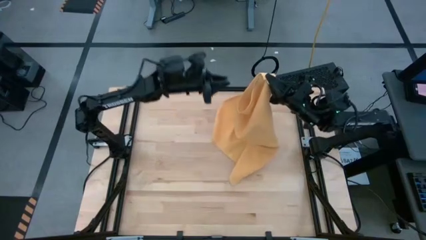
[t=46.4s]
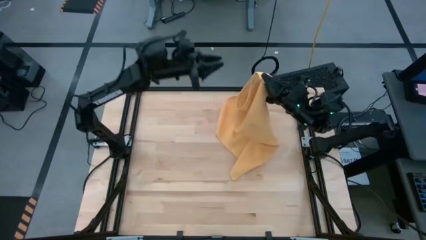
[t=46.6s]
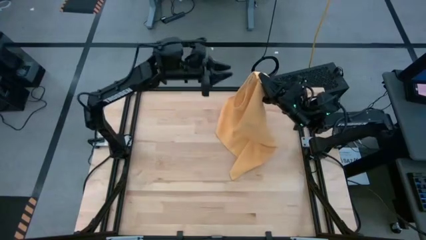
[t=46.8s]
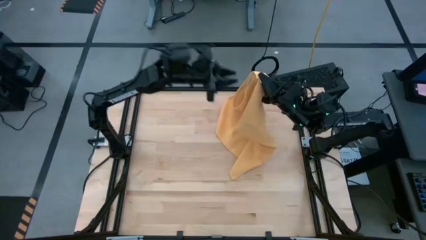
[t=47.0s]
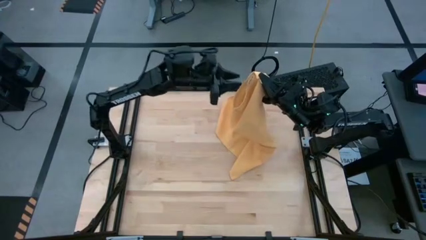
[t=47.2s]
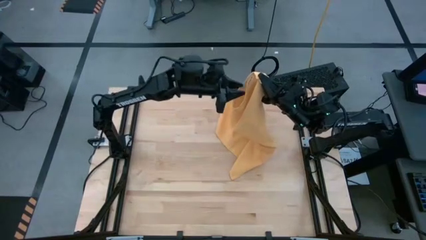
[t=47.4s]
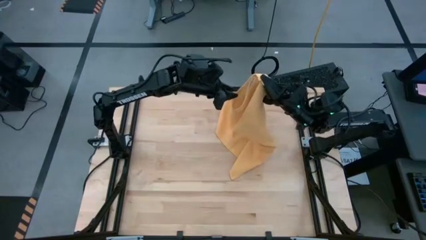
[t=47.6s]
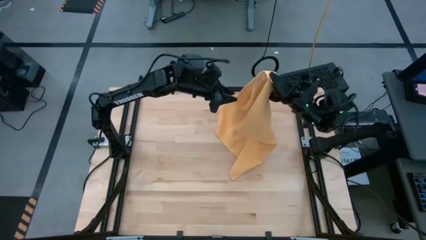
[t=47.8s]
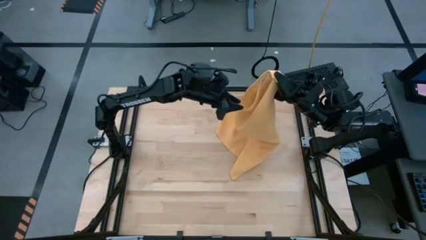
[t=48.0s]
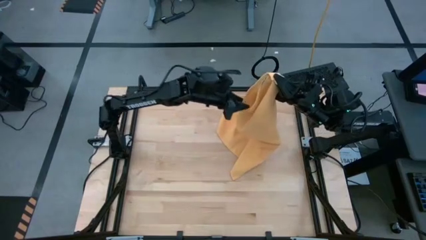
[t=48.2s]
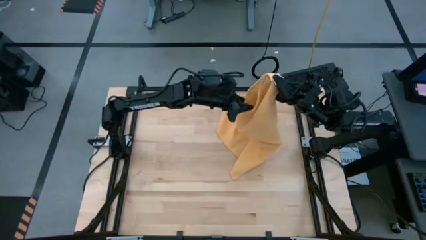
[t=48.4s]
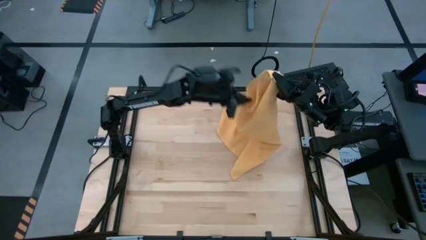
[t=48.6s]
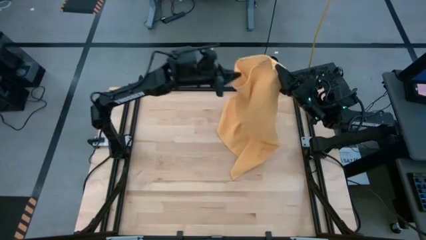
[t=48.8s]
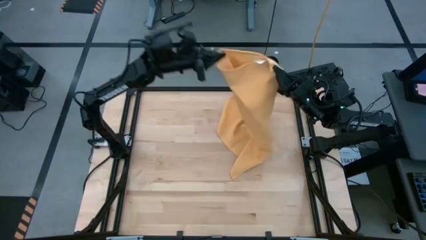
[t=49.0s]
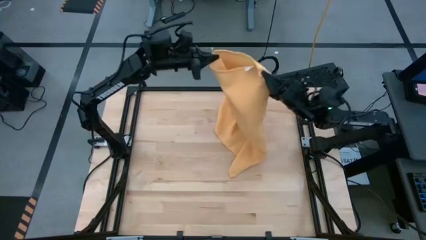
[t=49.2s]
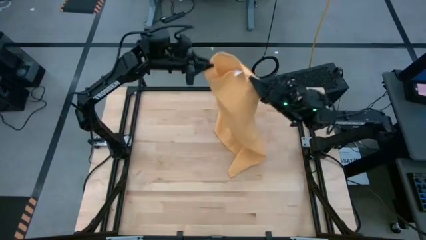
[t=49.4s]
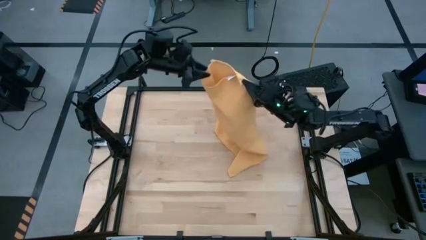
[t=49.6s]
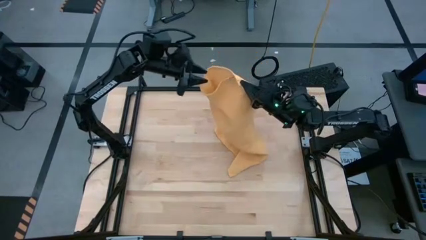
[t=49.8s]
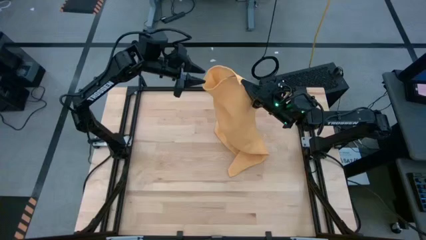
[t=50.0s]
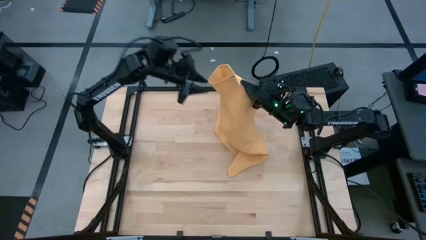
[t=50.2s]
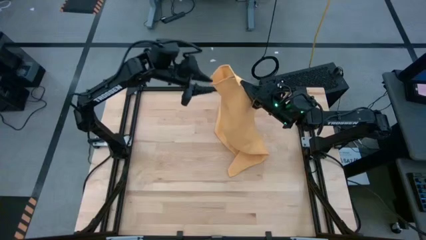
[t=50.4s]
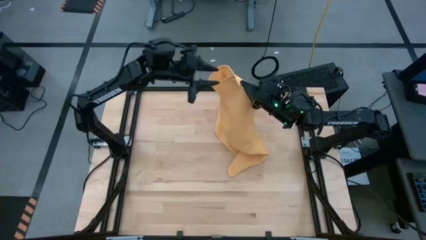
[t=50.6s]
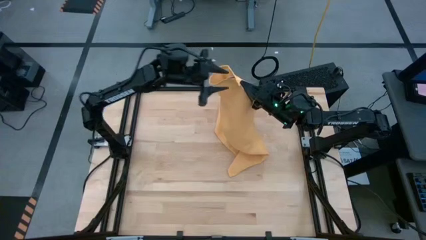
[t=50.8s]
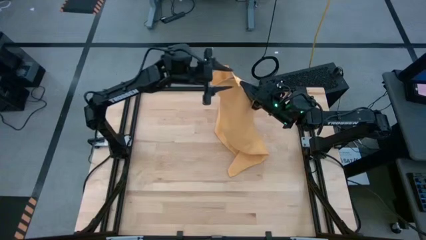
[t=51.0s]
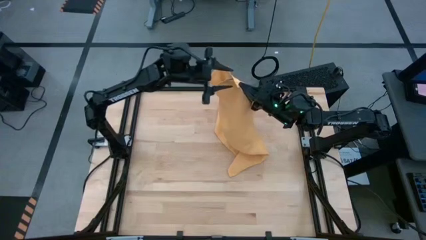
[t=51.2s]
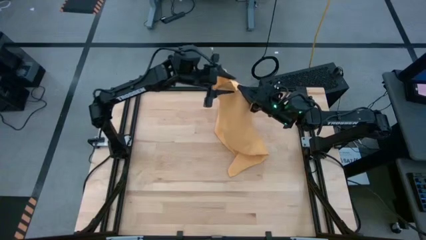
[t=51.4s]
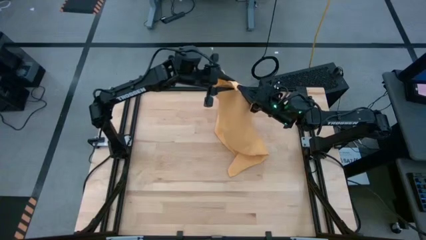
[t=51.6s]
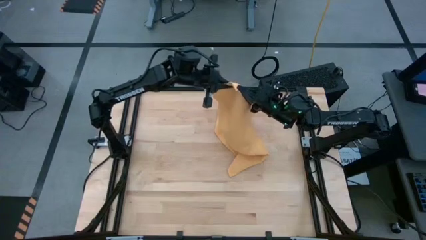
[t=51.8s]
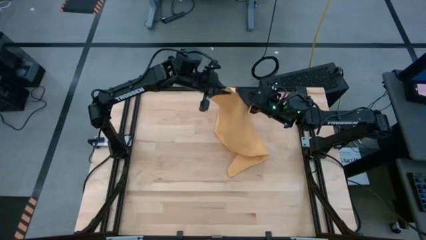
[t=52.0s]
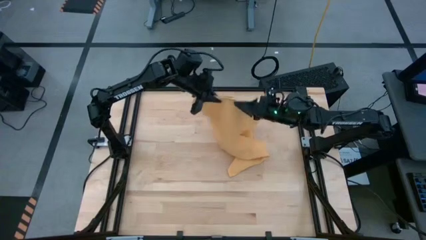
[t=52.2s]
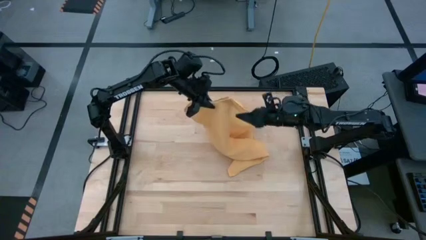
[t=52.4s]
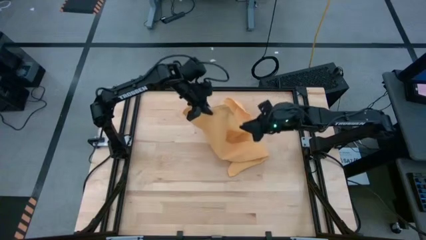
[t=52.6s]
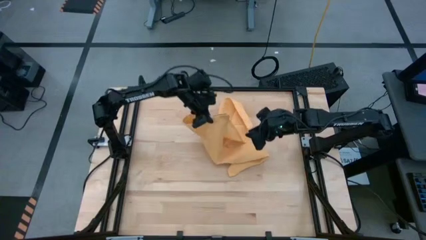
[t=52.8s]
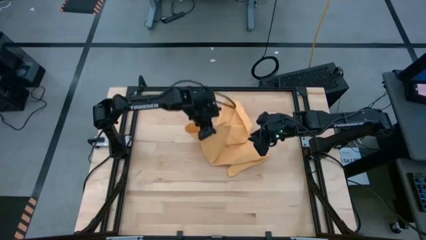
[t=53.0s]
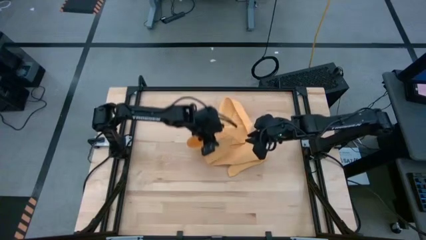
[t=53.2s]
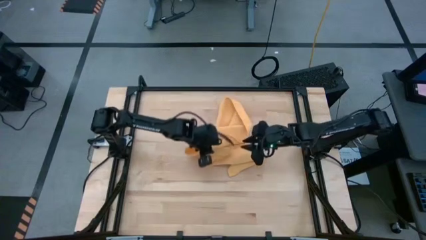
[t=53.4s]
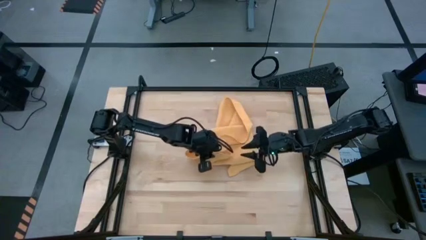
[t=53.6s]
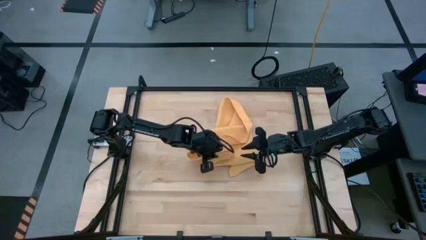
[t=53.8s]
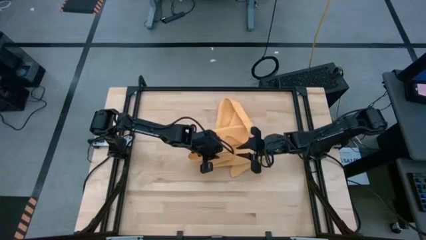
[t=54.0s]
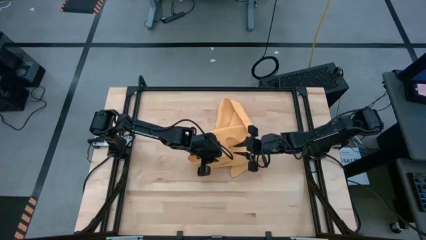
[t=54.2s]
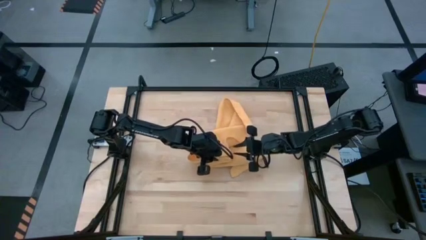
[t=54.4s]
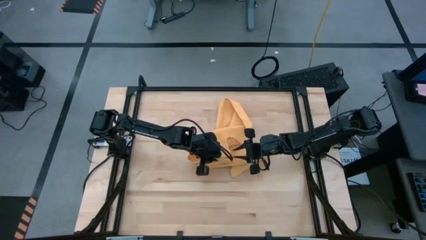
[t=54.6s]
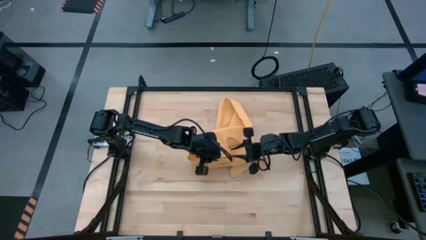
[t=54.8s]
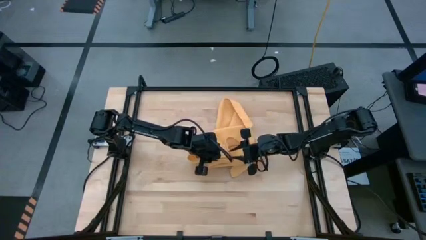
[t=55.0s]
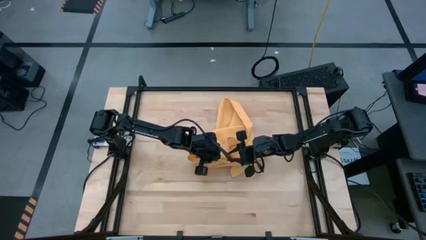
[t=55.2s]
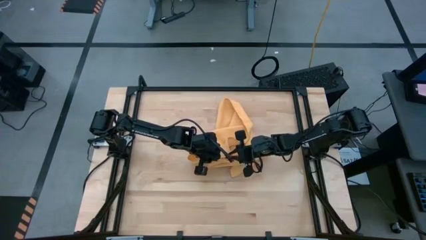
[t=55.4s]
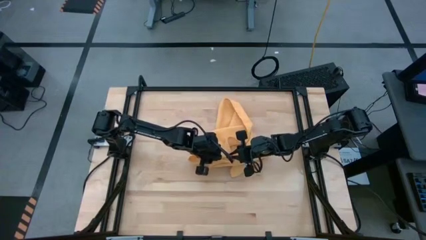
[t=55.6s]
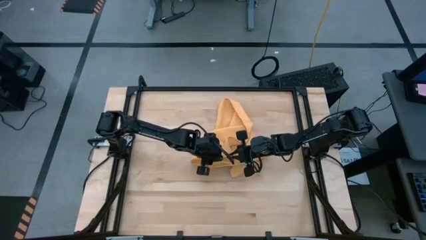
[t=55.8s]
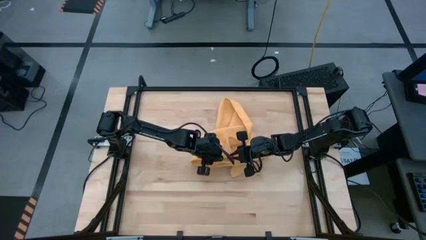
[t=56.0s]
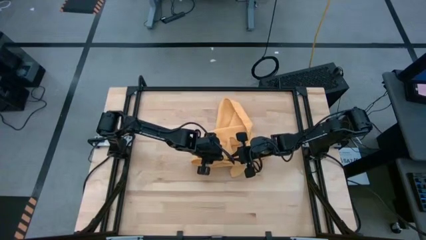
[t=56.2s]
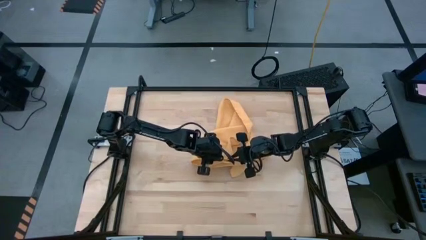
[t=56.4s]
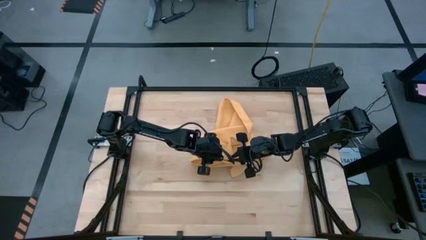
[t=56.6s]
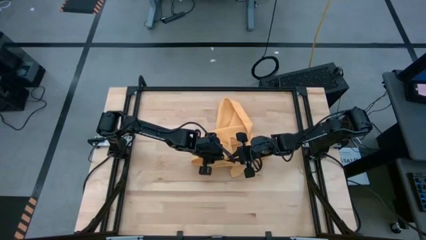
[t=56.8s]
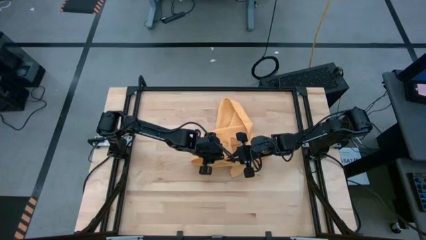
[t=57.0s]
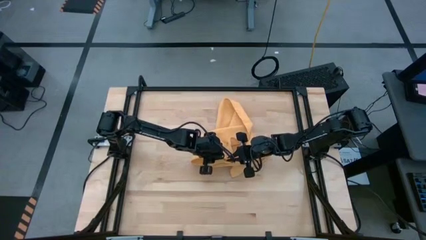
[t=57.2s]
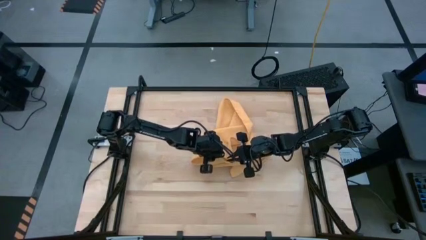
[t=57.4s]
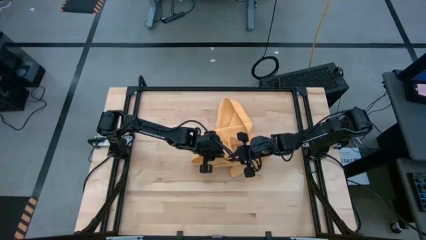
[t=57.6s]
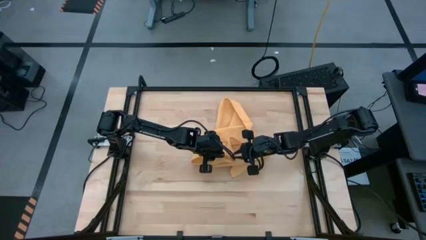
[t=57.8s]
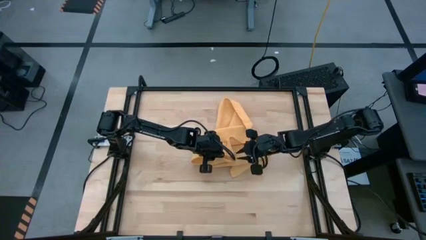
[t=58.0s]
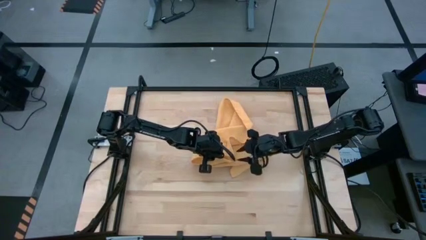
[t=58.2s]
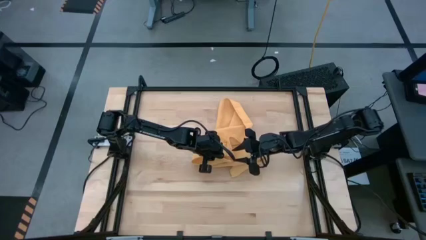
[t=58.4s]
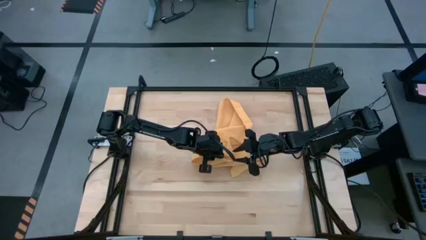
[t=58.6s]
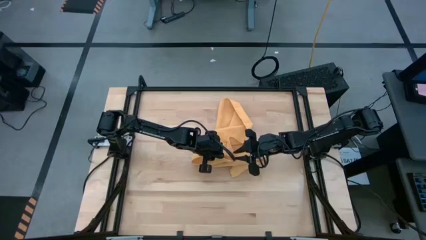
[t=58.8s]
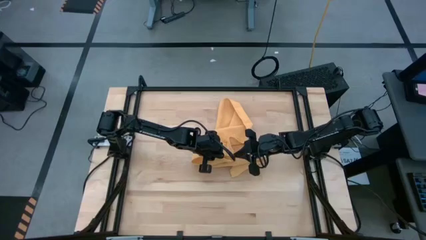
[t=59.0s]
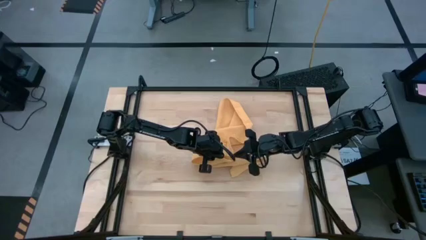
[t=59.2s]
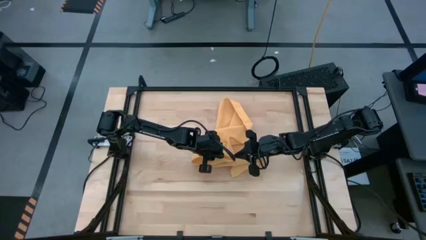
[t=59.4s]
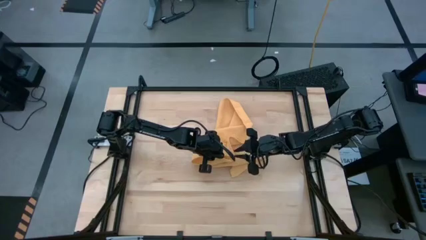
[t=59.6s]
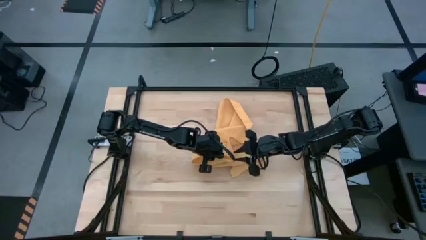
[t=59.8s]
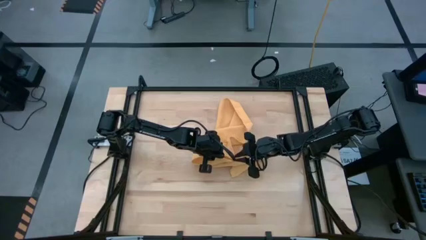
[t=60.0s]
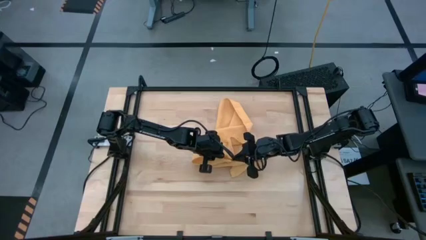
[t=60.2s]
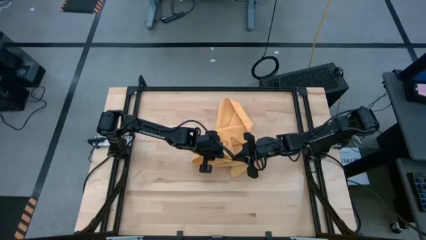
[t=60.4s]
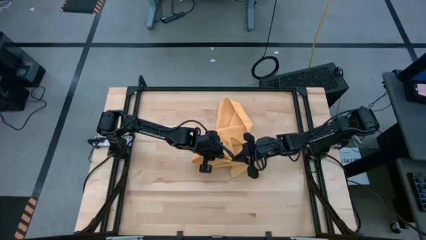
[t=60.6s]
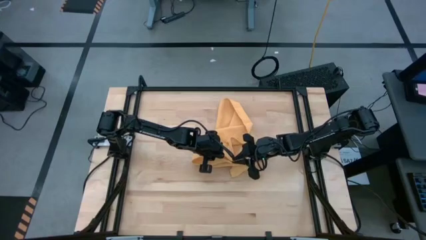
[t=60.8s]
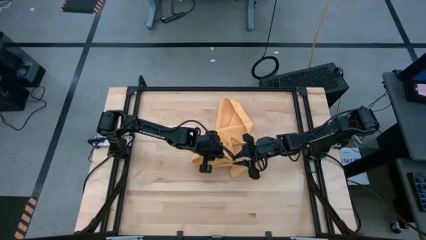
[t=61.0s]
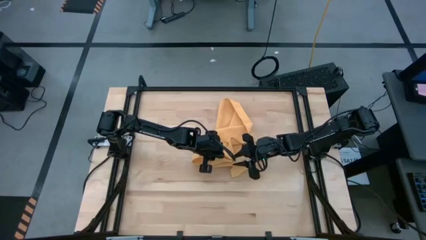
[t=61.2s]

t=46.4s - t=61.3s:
Task: Roll towel
Roll the yellow towel

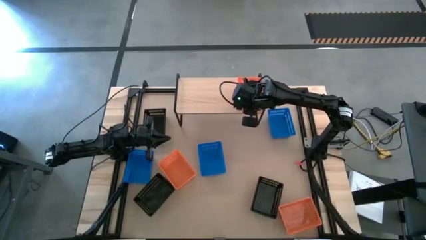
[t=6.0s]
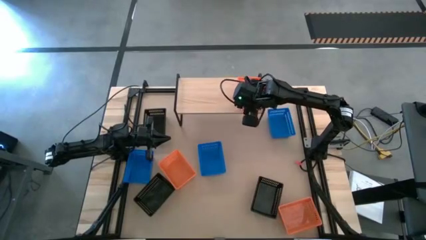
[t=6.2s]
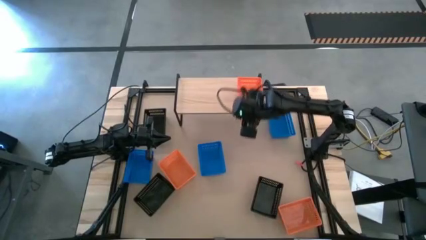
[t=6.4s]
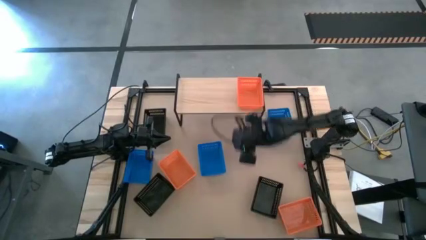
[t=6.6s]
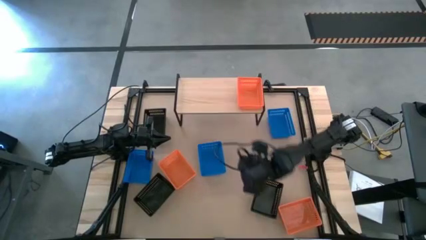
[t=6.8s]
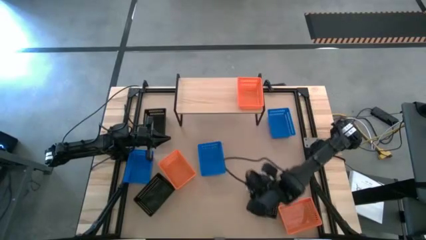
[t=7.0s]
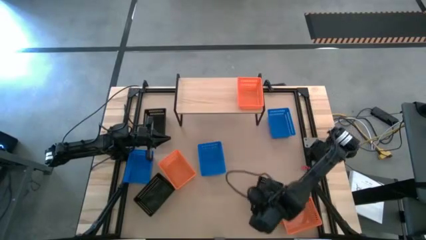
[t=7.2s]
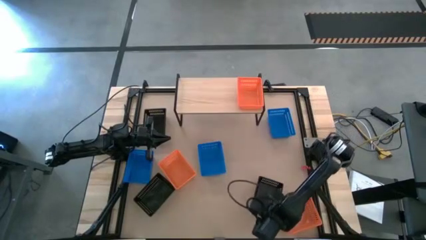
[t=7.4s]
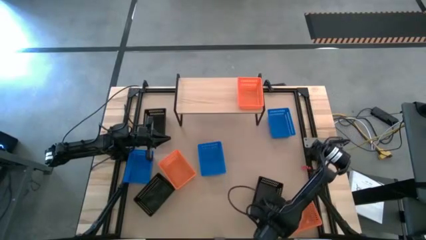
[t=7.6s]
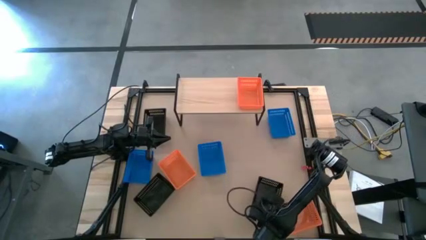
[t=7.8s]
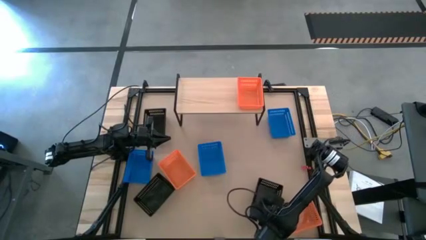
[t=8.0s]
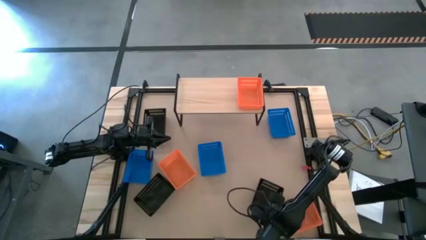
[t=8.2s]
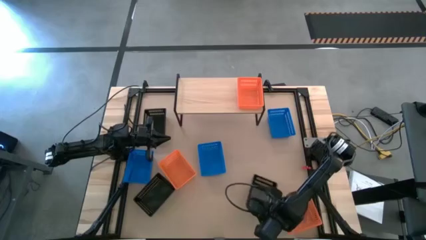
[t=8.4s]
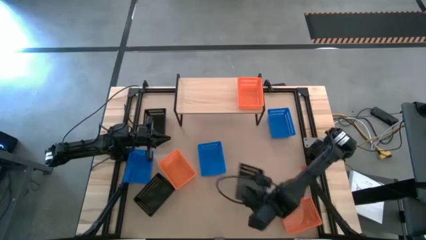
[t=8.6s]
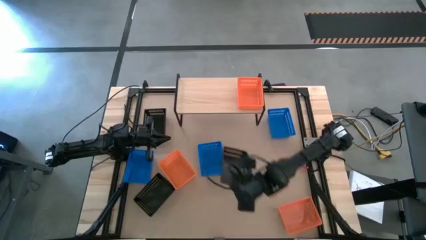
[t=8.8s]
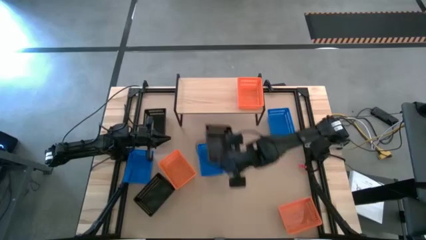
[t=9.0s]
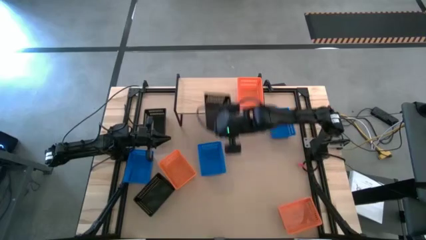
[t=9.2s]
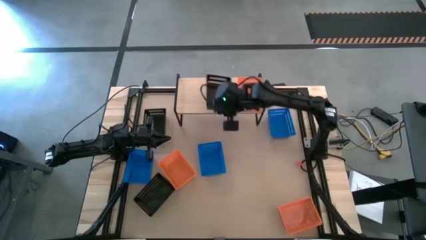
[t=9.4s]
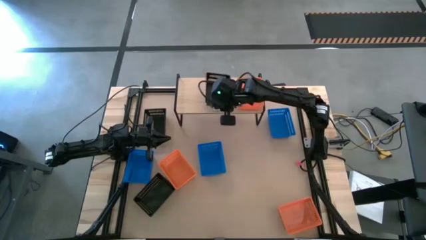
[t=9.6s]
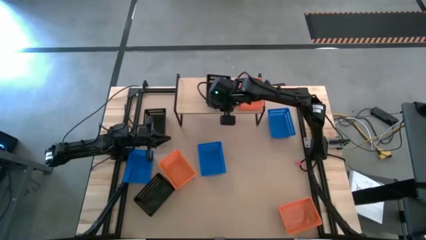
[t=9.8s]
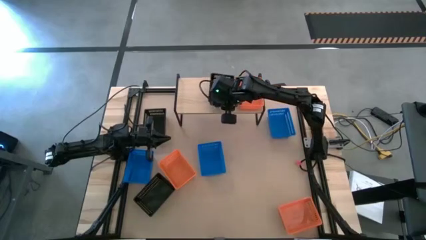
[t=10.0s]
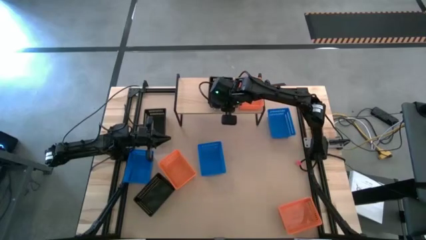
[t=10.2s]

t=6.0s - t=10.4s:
Task: Stack baskets on shelf by color
Put the right black bin on the shelf
